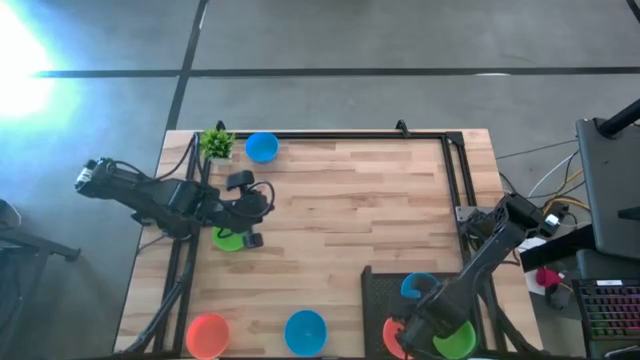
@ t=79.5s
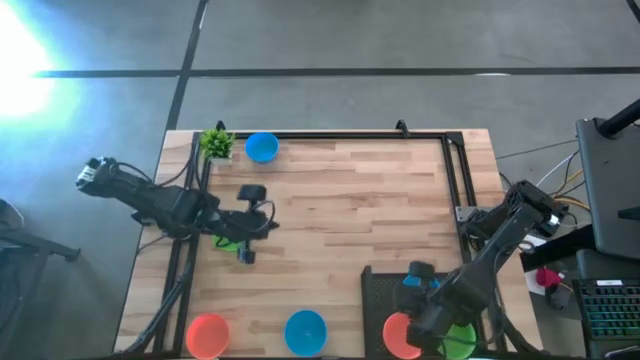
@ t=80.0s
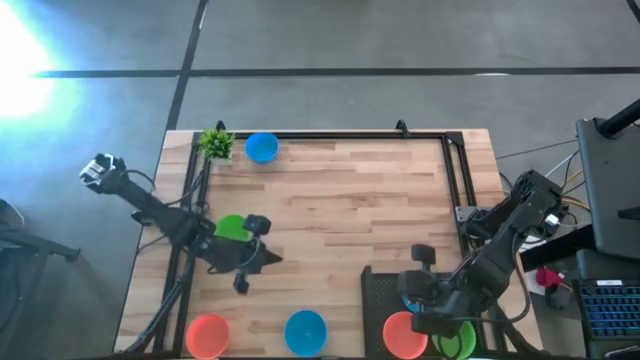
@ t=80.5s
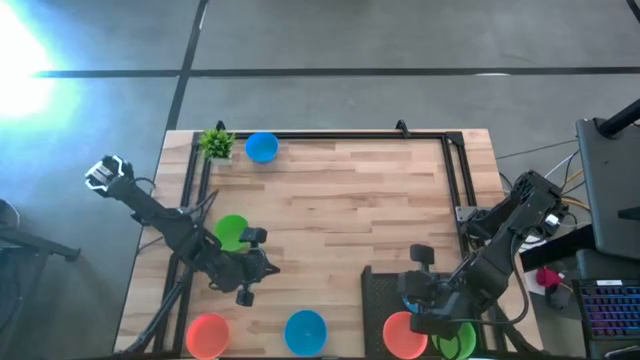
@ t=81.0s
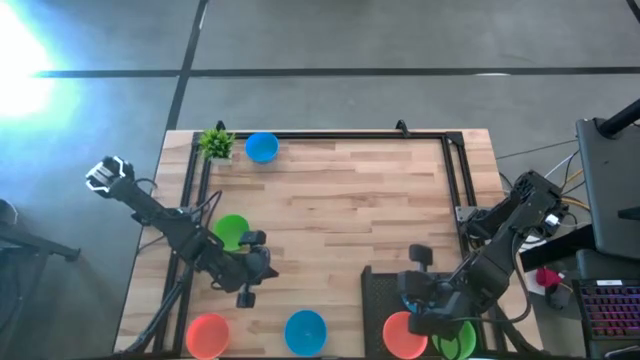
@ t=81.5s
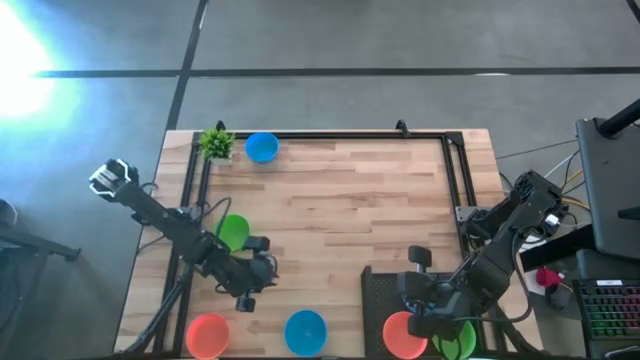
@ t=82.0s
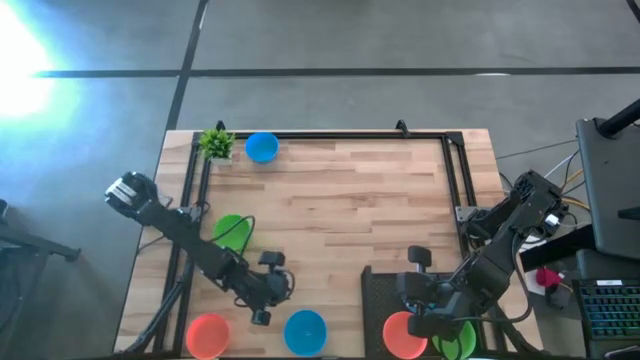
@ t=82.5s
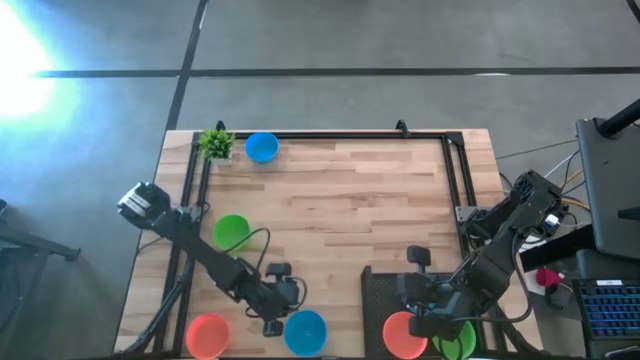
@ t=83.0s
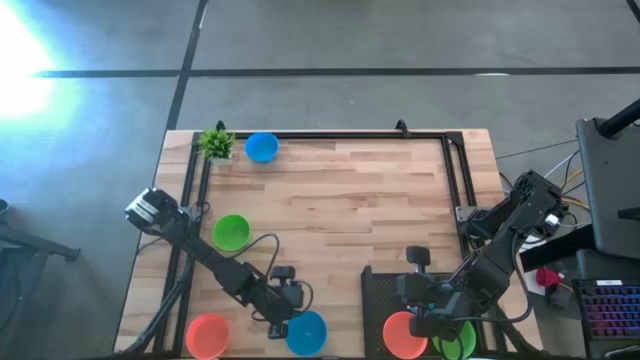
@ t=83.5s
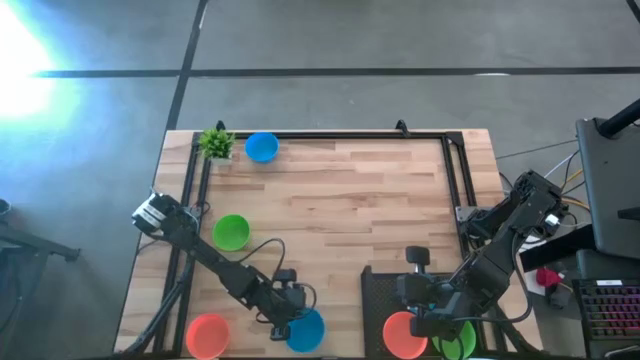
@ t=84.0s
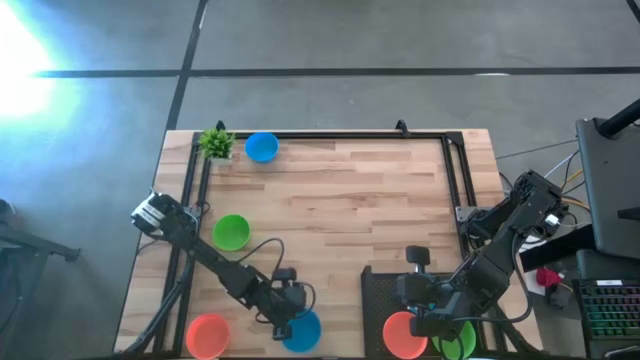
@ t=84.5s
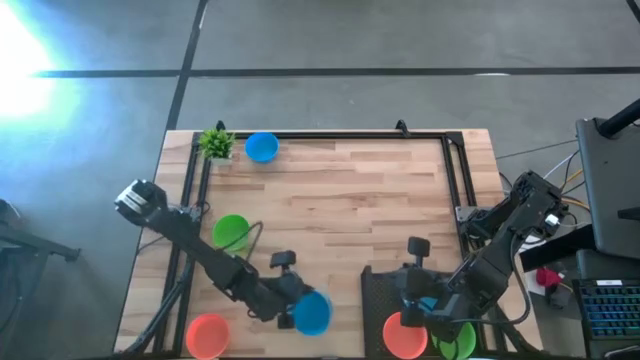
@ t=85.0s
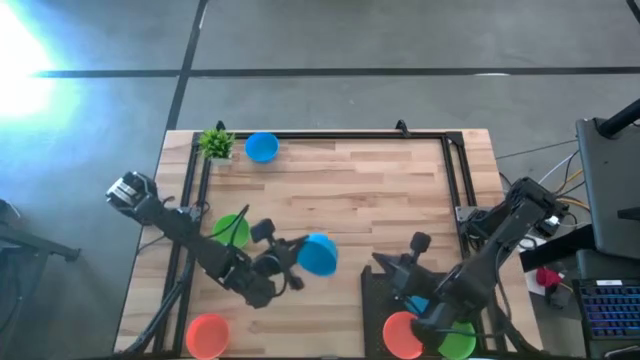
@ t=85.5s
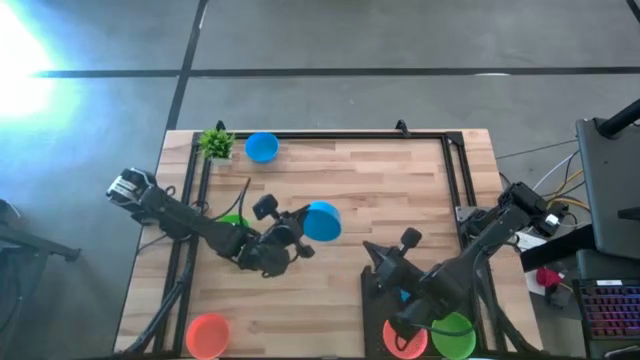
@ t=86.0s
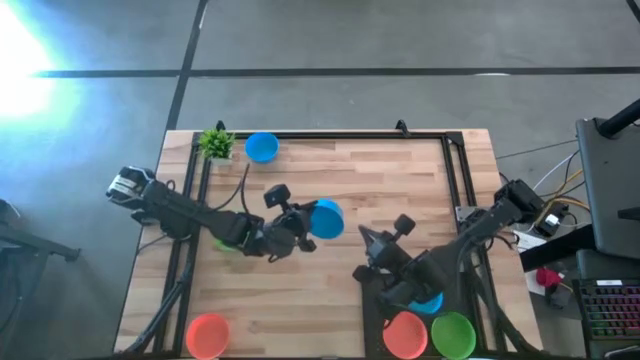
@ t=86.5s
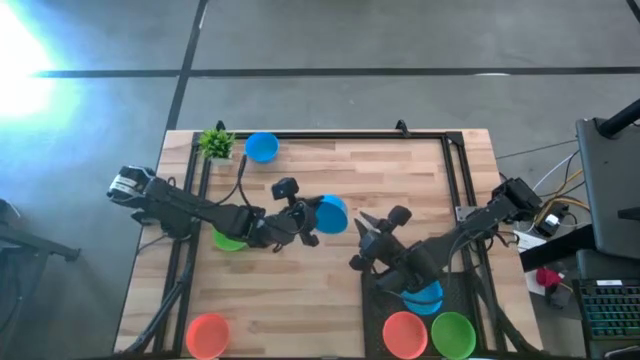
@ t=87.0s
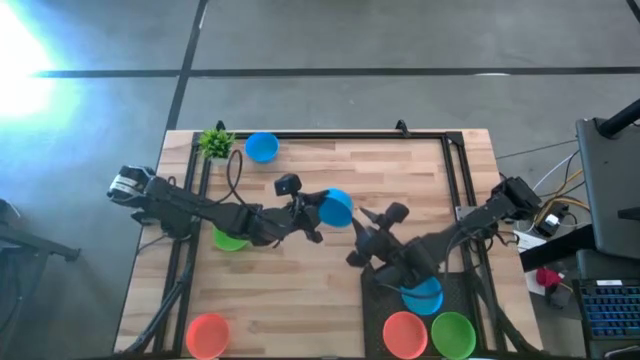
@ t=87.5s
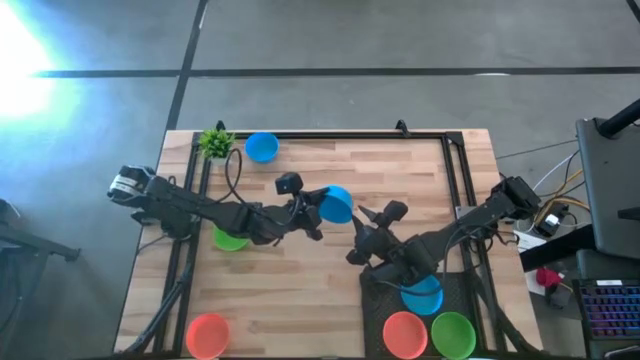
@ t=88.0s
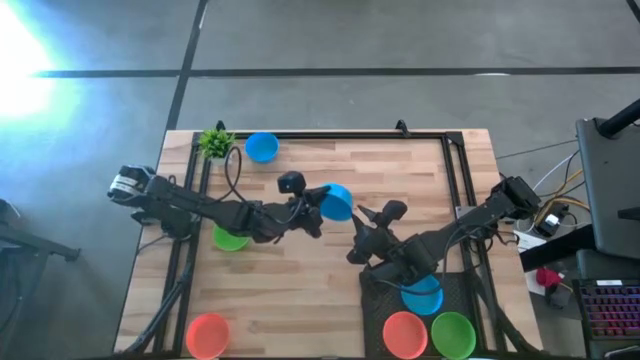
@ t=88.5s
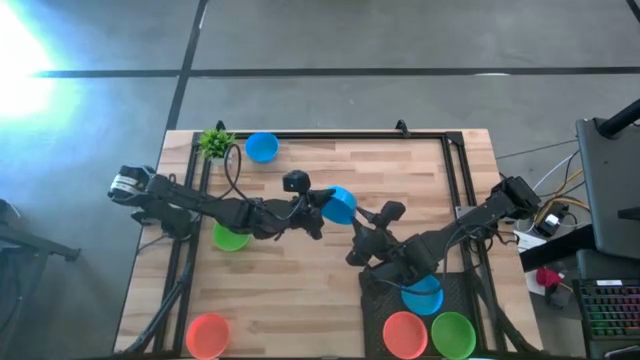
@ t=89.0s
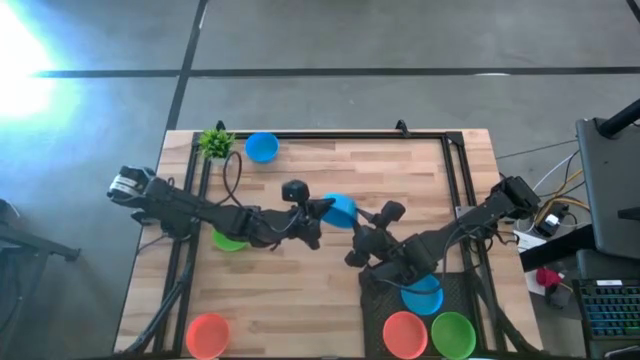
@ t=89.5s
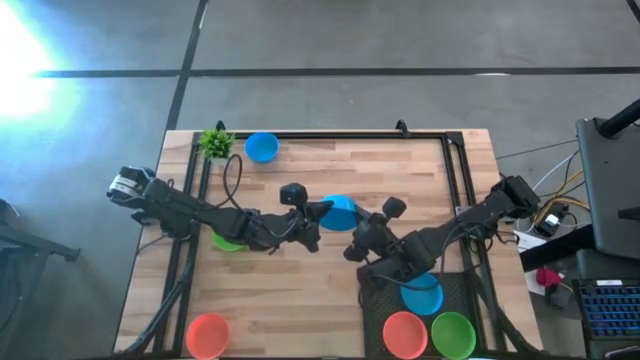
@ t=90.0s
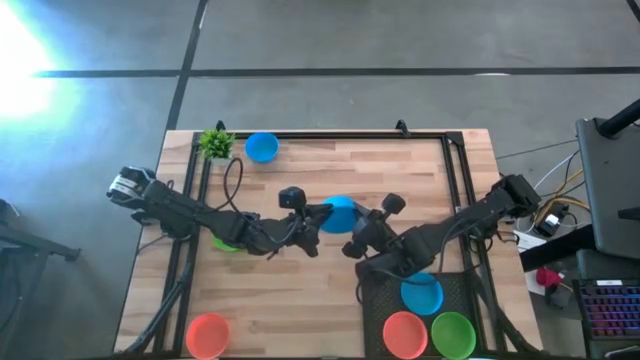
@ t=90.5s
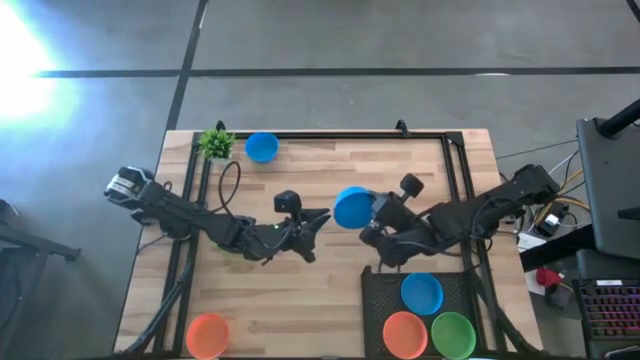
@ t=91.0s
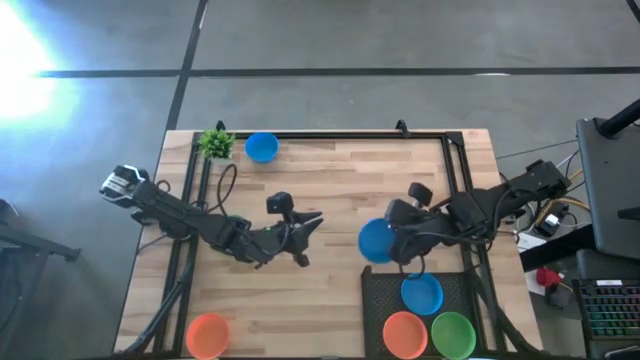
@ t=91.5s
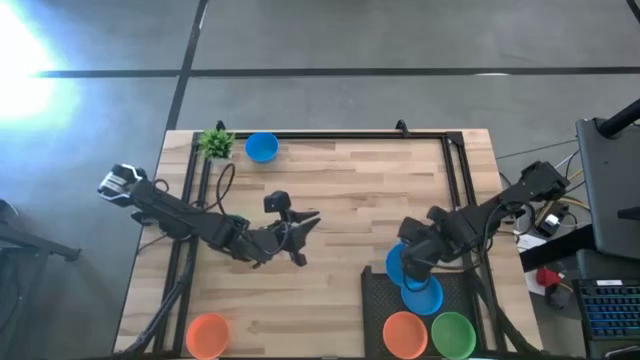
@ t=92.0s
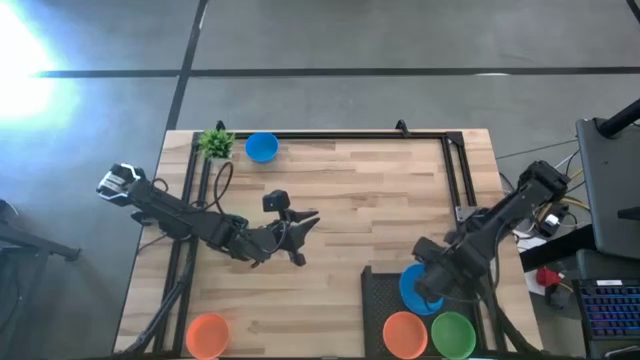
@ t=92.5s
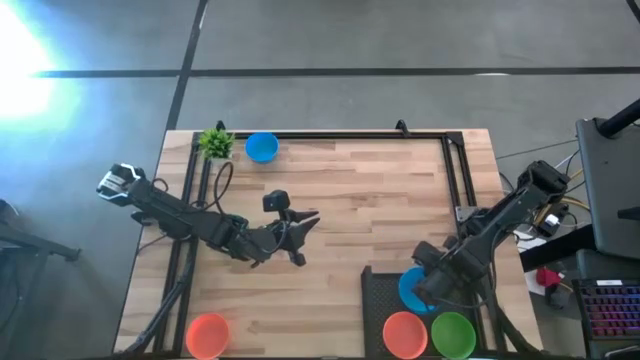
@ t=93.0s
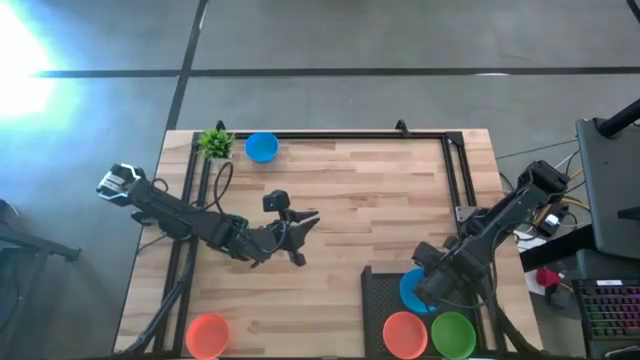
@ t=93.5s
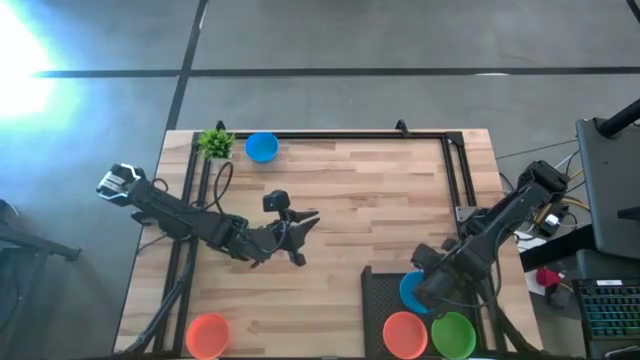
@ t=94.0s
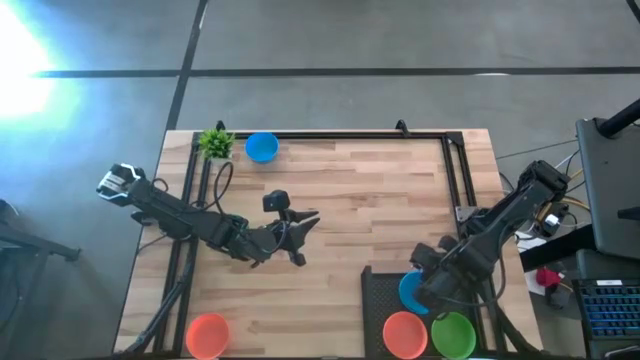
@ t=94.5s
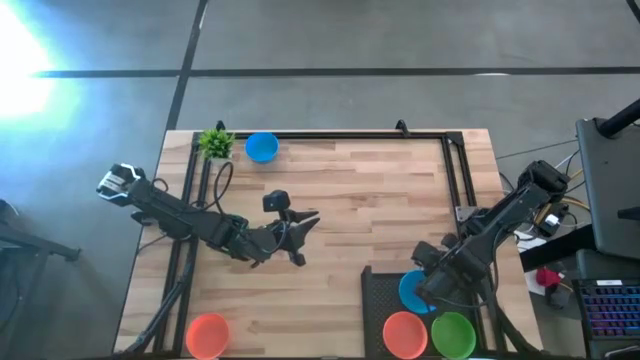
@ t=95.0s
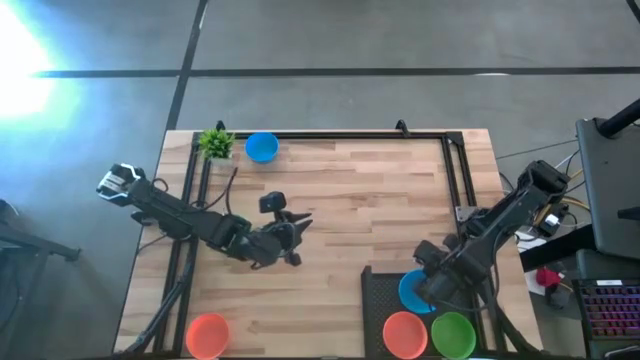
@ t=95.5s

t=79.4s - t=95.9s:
Task: Pick & Place Mini bowls
Stack the bottom blue bowl on the blue bowl on the shelf

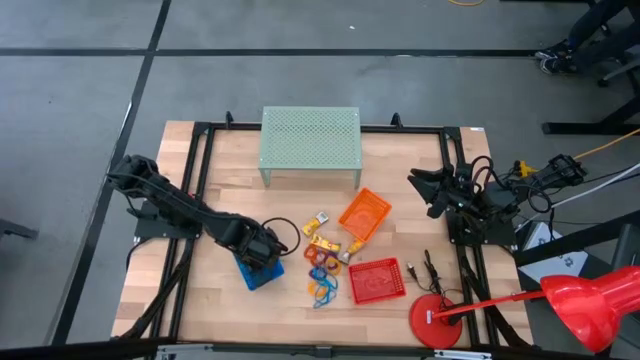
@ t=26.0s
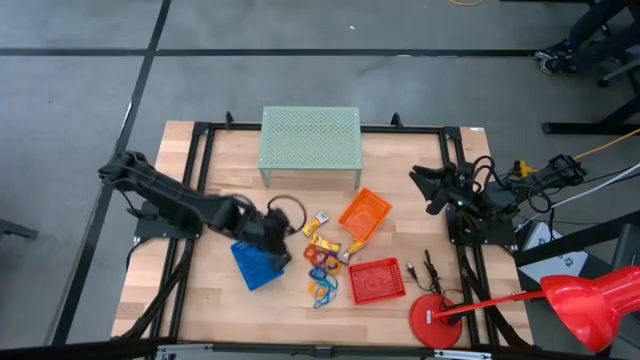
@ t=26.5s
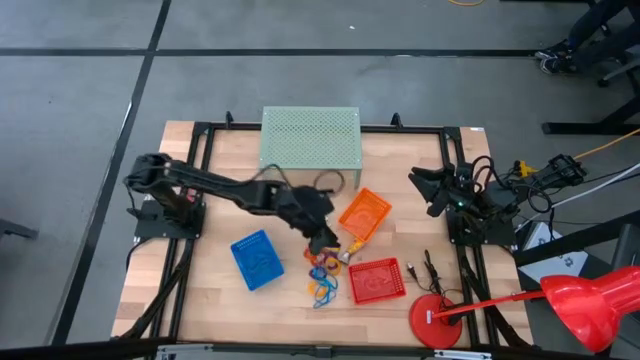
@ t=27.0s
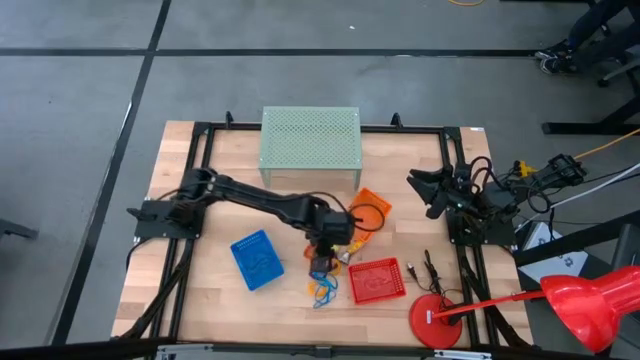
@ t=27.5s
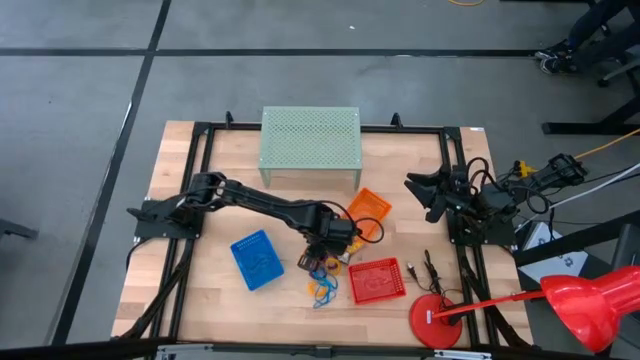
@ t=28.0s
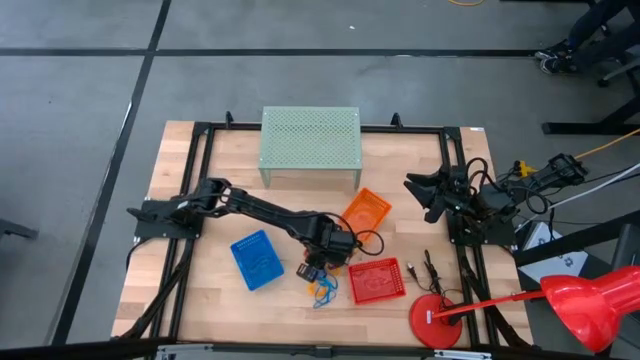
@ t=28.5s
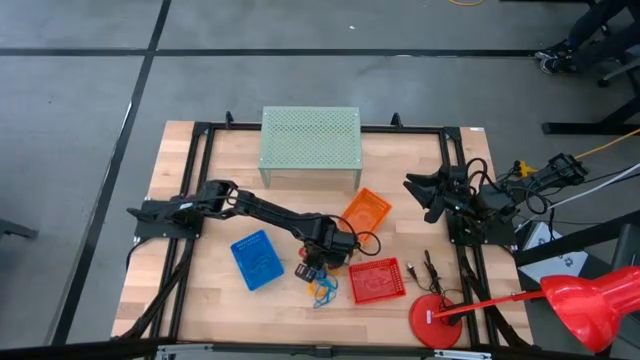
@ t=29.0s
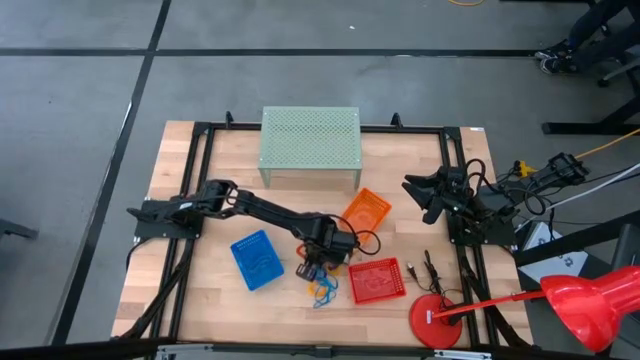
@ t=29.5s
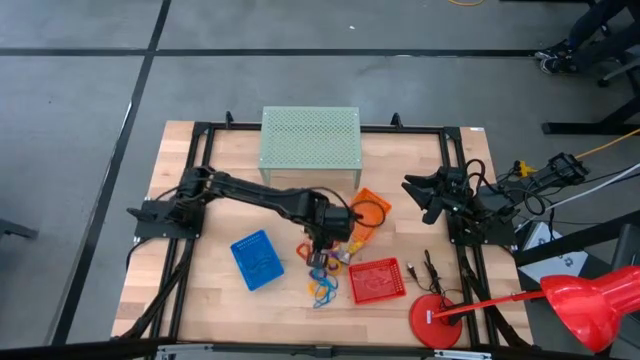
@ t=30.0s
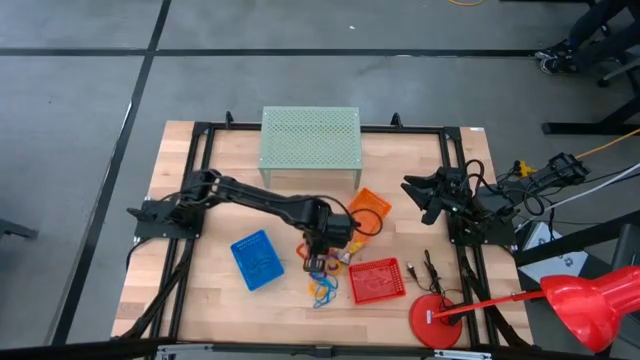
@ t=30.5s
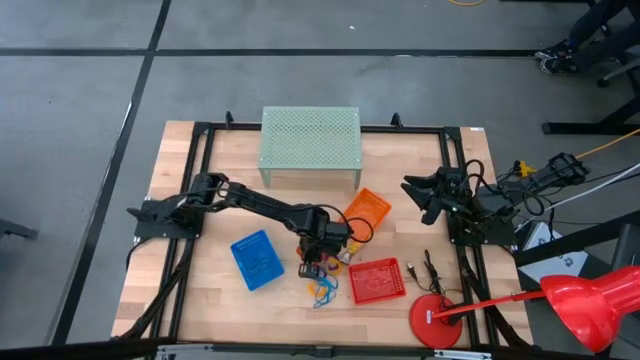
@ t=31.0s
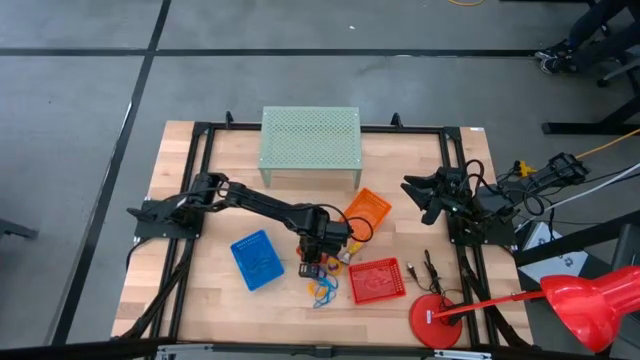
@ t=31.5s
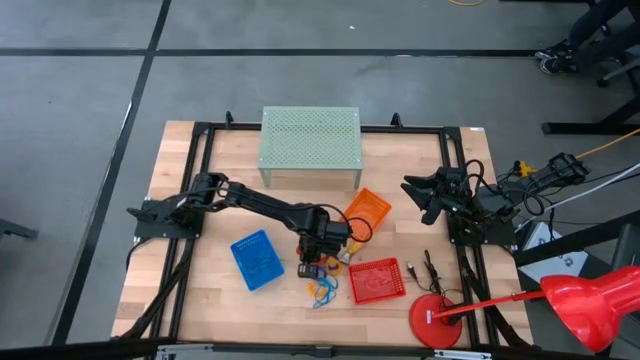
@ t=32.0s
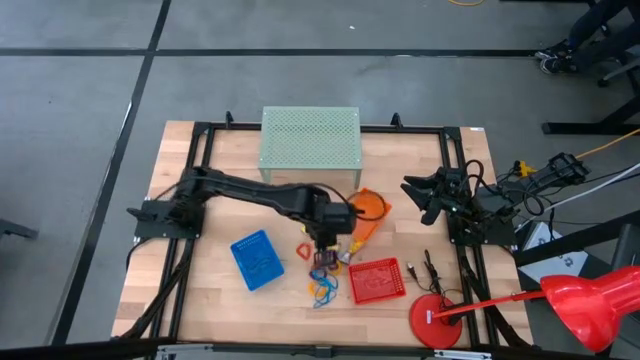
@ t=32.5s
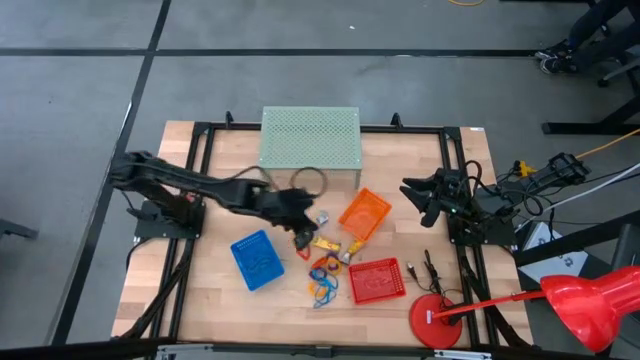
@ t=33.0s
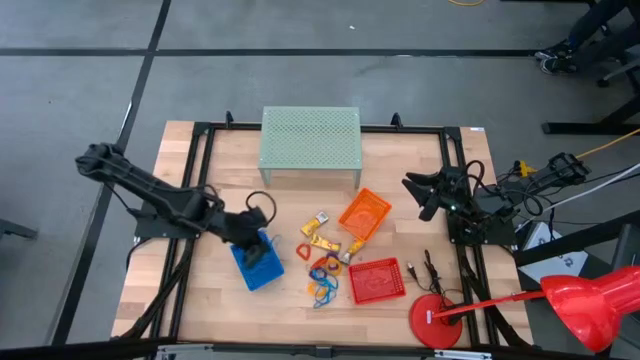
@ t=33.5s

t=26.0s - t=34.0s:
Task: Pick & Place Office Desk Supplies
Put the blue rubberband into the blue bin
